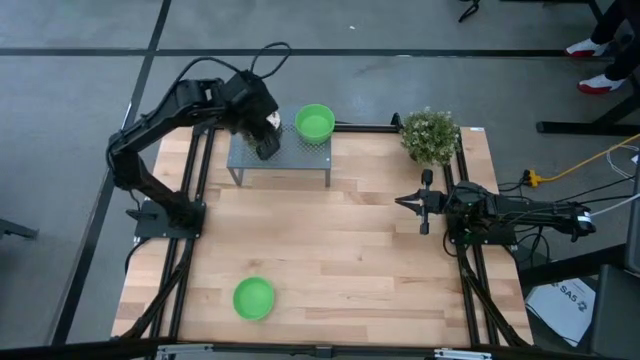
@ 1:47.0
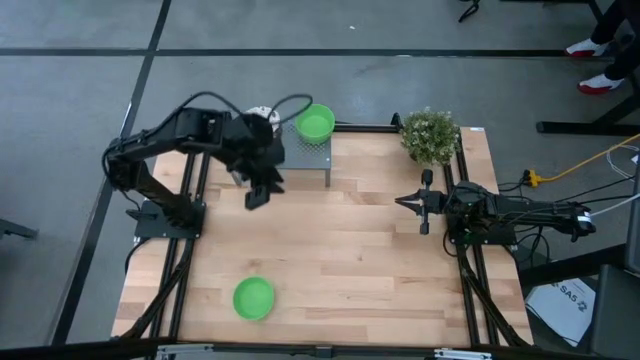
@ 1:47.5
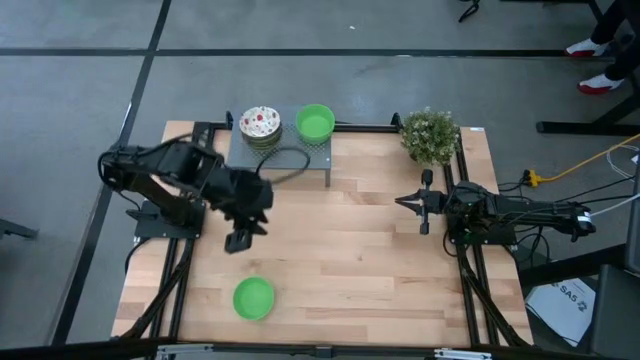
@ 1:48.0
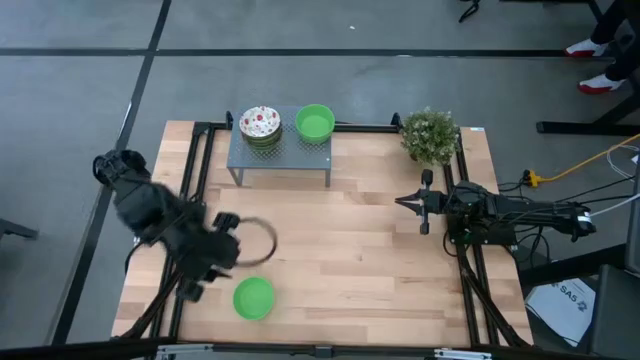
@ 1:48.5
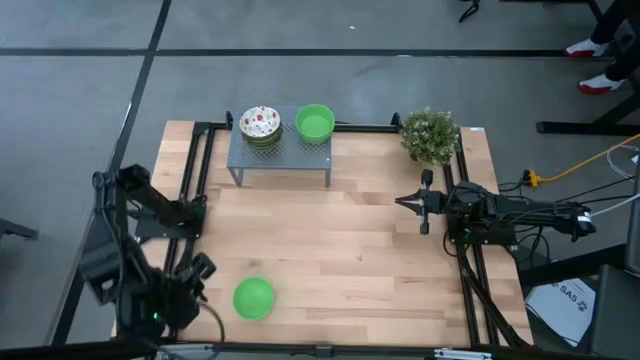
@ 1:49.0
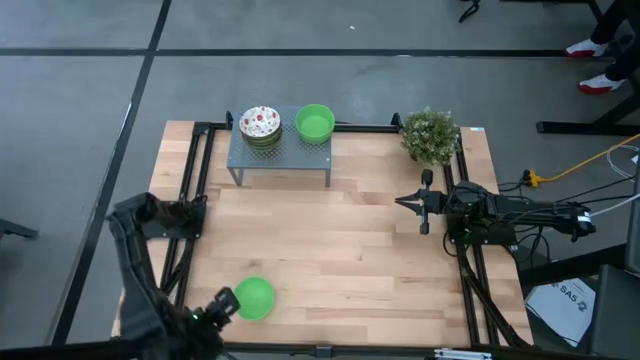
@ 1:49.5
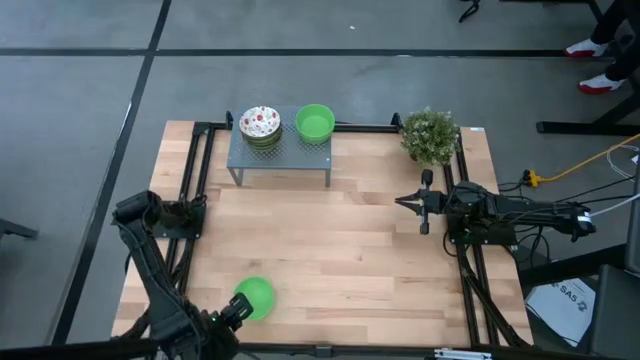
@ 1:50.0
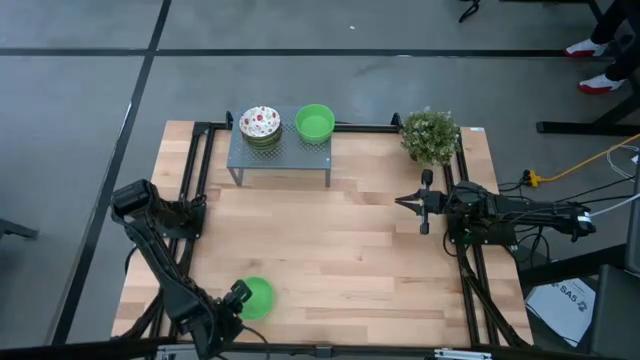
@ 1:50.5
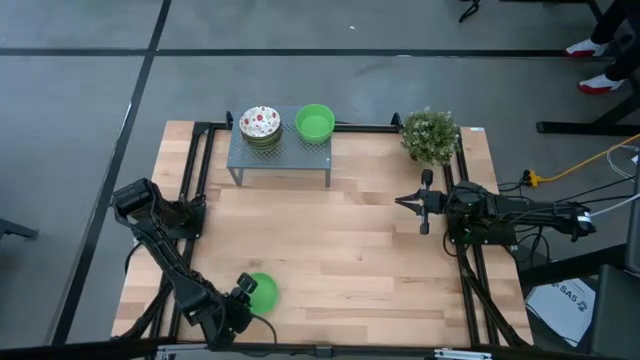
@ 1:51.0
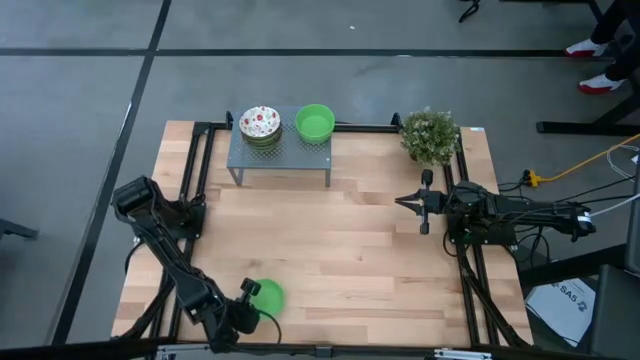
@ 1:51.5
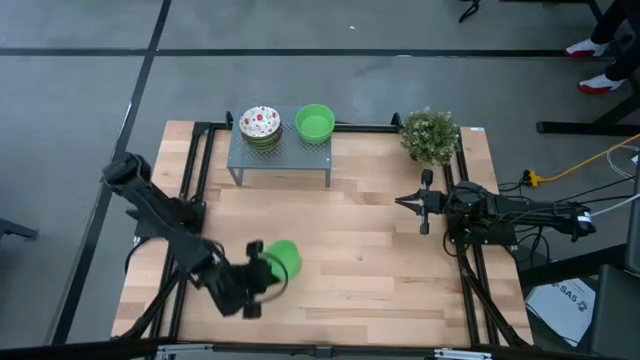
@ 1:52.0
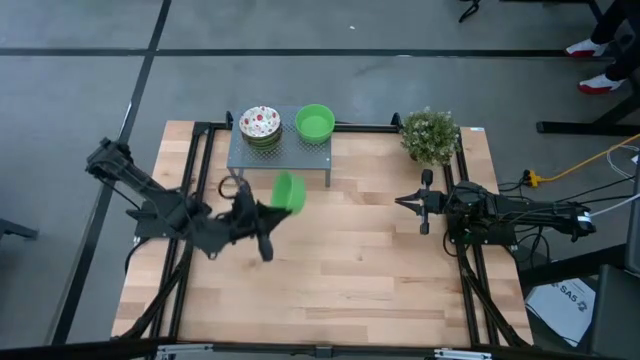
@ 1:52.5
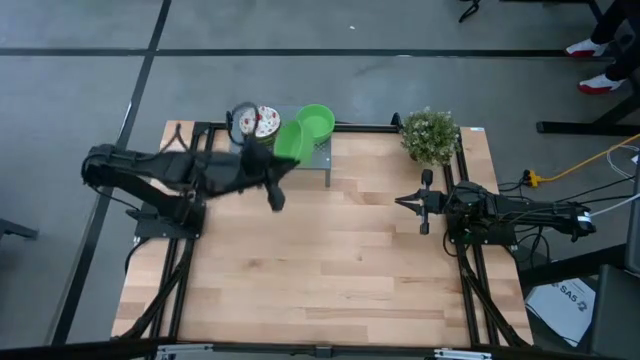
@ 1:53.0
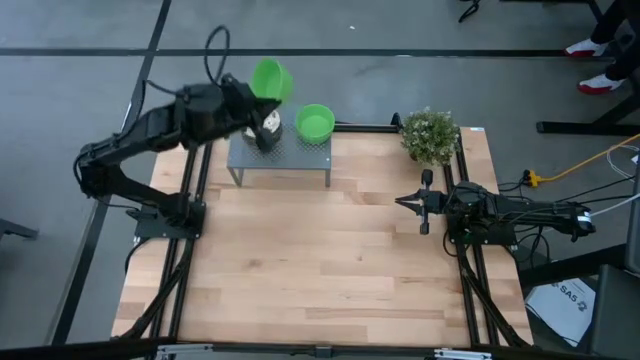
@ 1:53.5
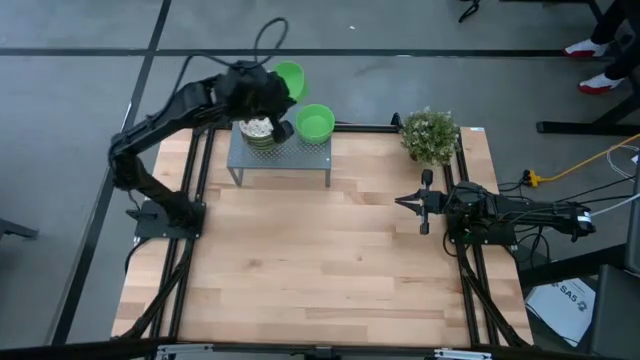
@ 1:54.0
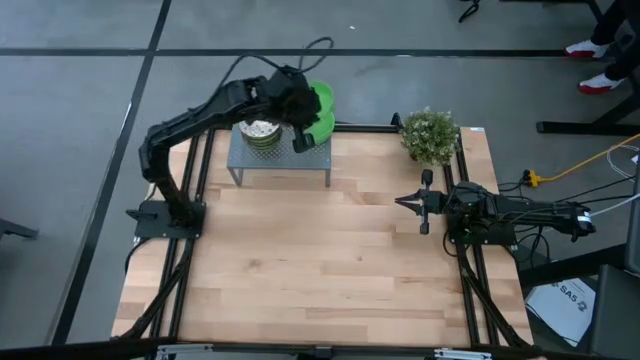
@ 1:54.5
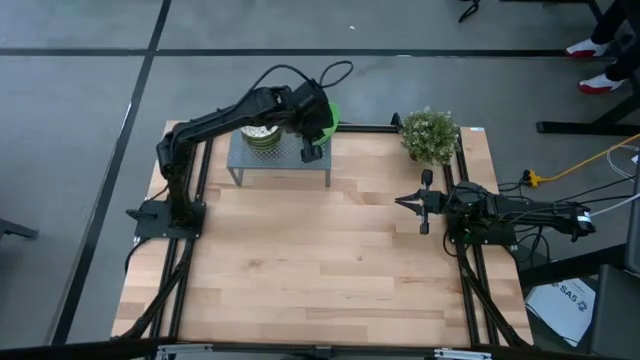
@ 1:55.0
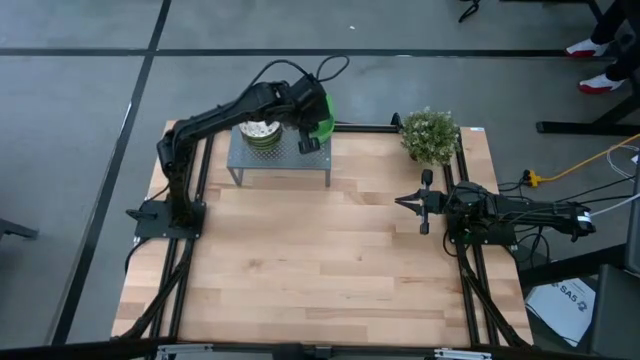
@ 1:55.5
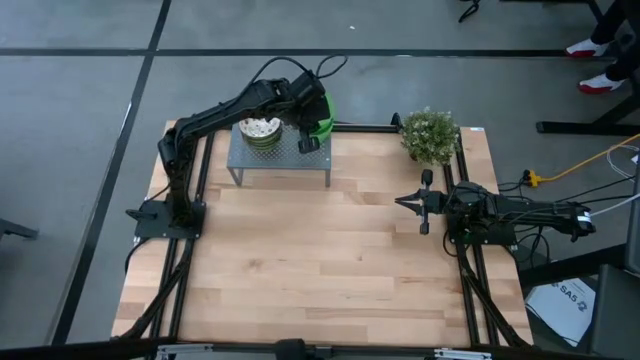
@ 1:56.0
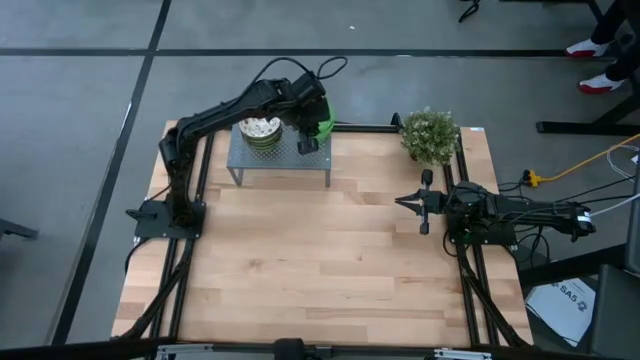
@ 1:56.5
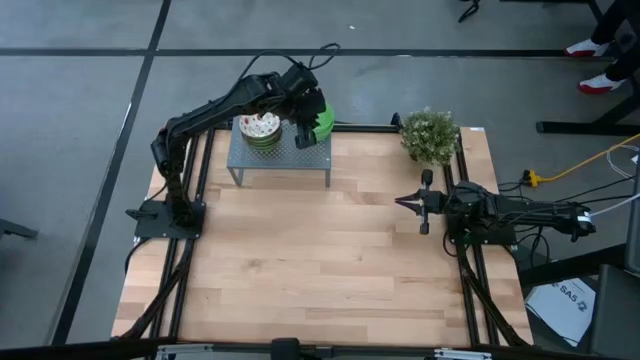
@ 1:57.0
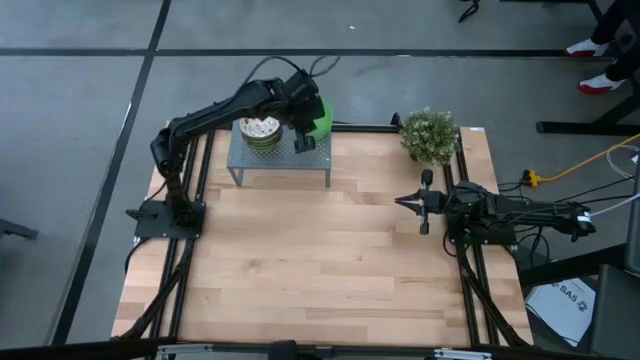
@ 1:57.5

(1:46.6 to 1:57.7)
Task: Pick & Place Mini bowls
Stack the green bowl on top of the green bowl on the shelf

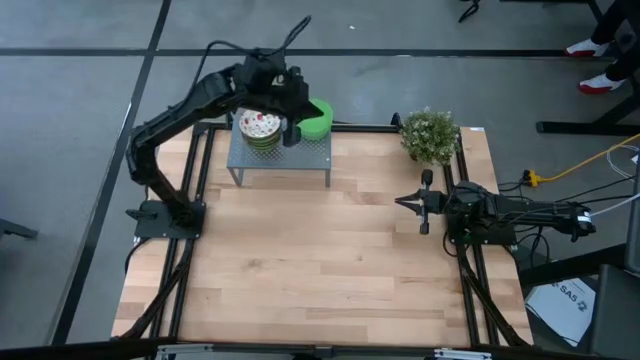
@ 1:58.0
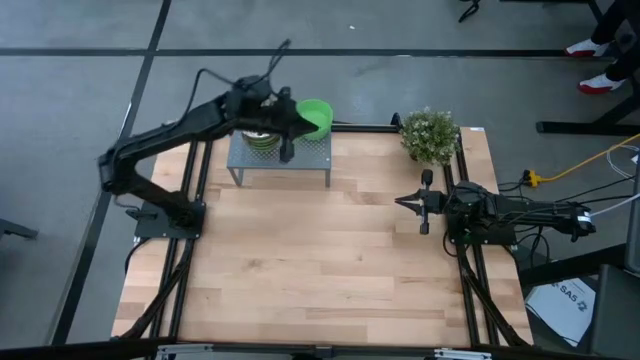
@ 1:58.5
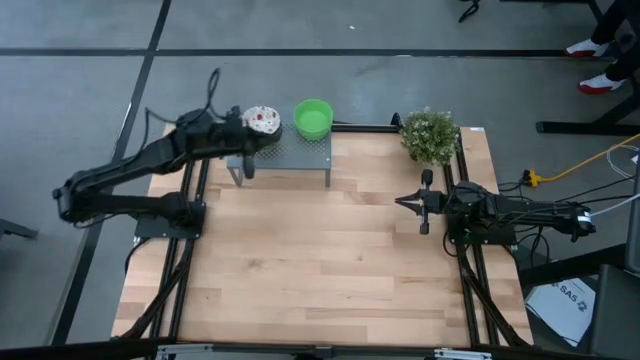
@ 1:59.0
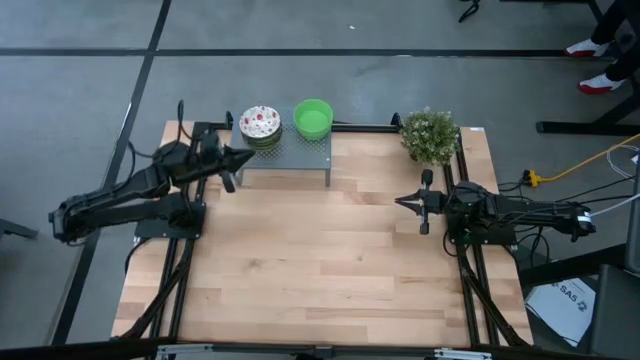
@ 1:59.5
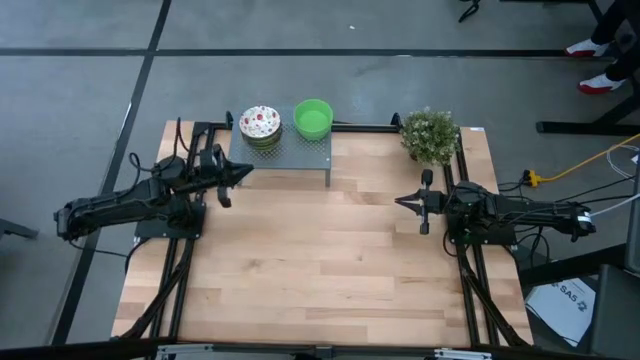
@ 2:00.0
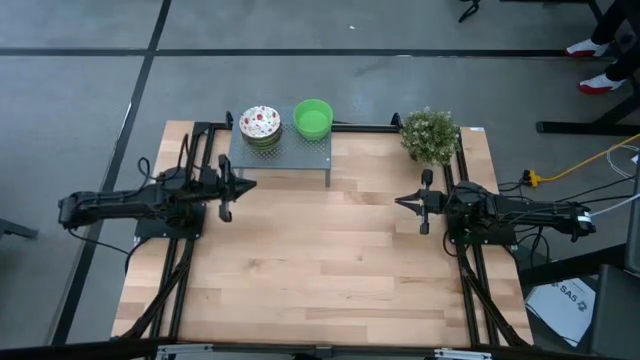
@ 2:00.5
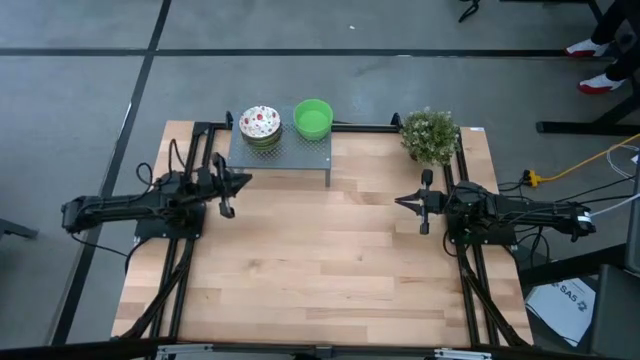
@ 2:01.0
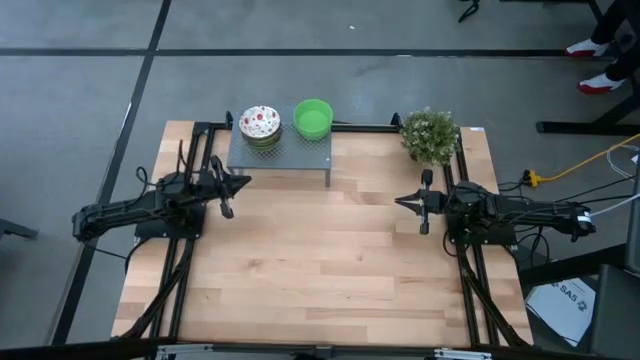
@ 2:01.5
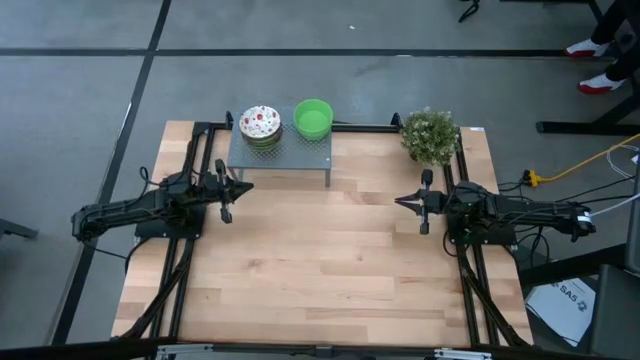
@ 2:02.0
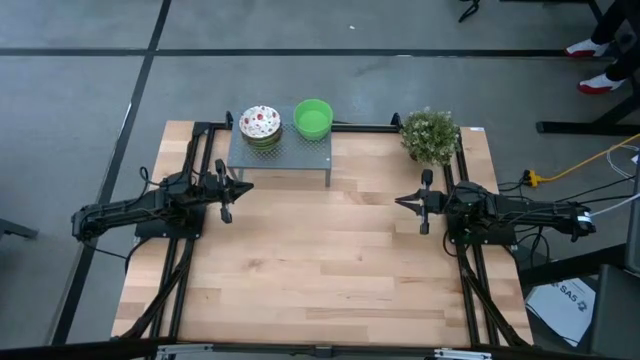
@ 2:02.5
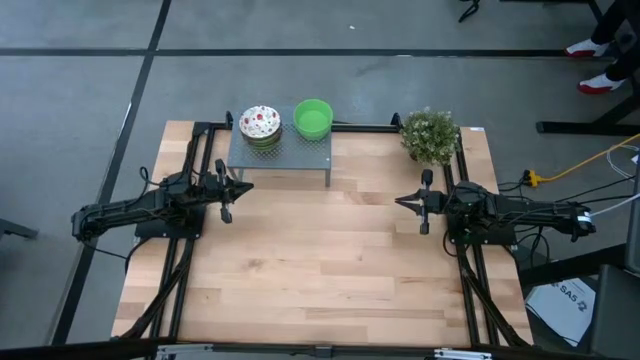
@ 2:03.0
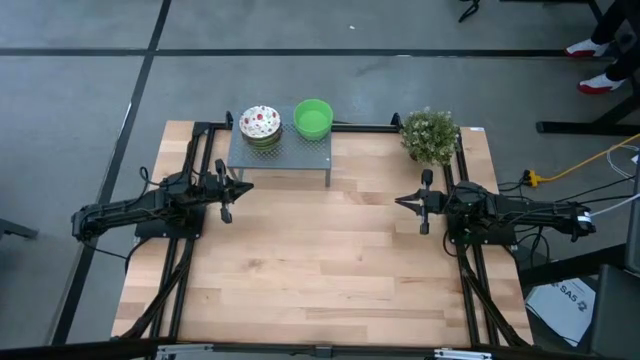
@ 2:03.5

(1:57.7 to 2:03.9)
Return to Home Position
